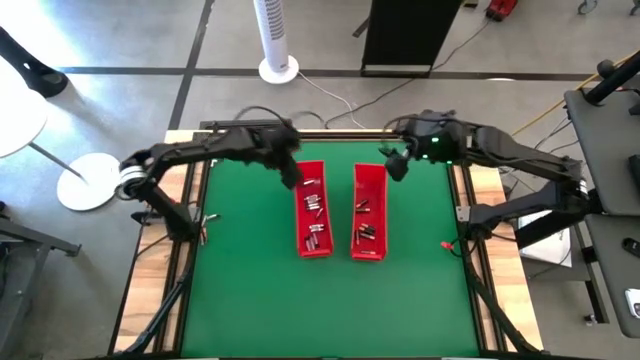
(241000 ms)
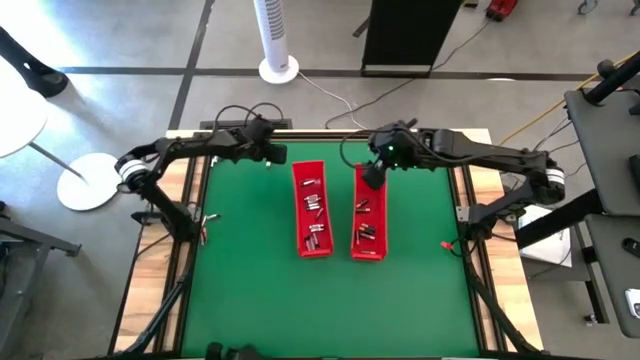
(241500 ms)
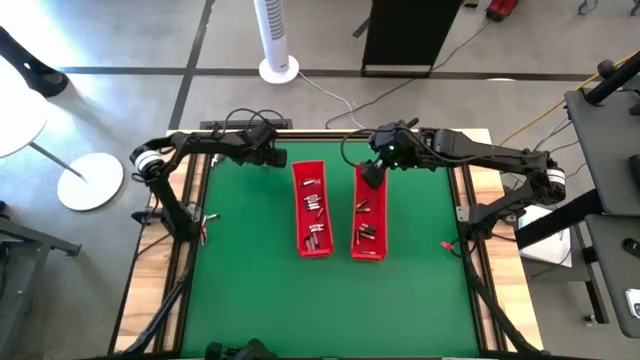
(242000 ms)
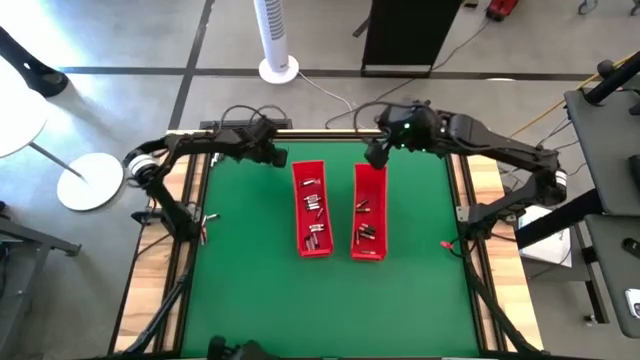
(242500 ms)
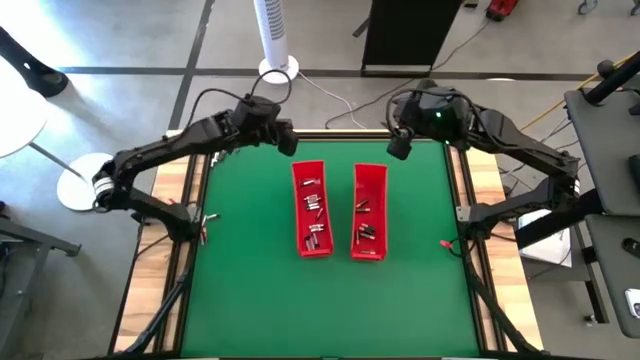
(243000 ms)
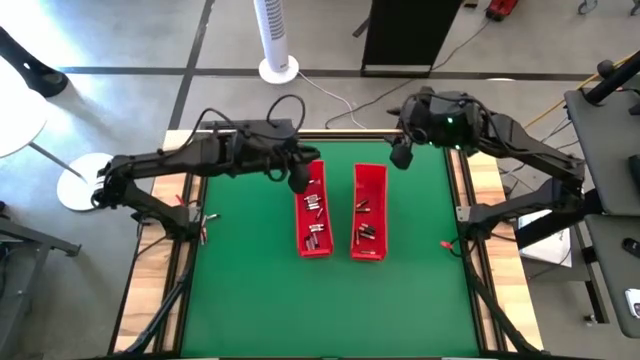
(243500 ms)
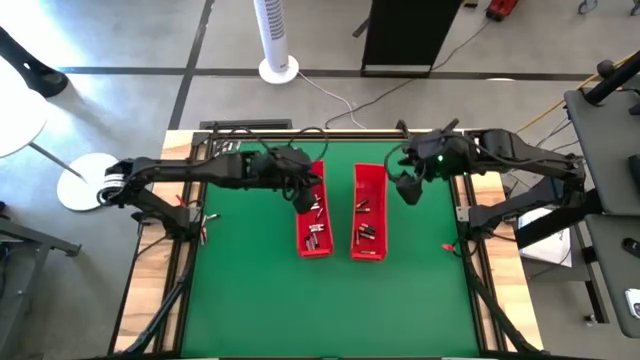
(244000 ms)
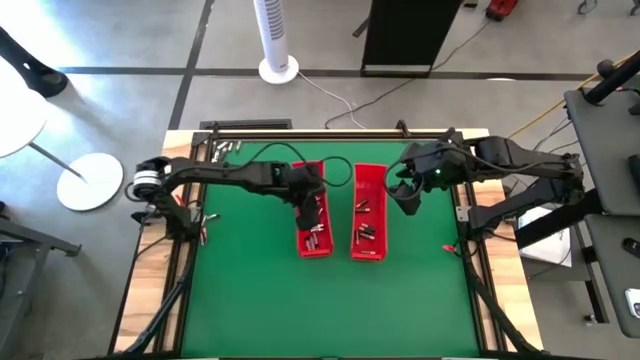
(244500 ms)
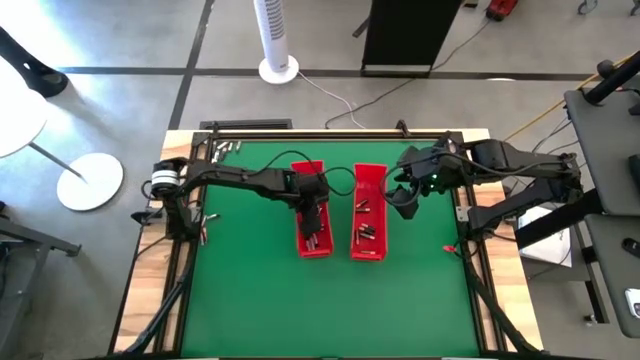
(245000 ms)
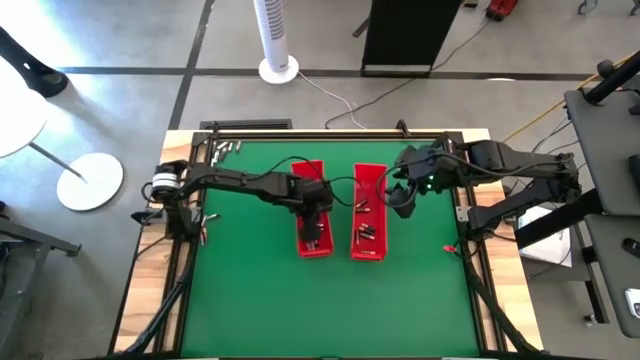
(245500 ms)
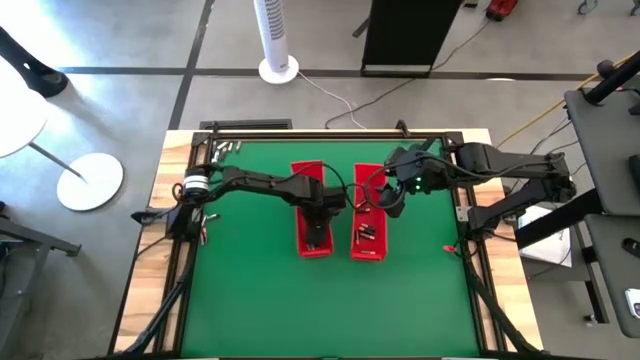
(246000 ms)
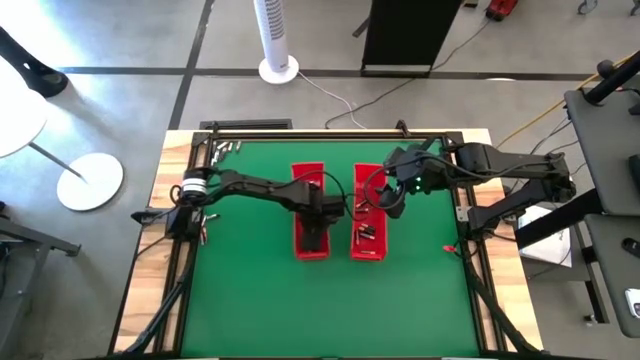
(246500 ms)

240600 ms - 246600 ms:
Task: Sort batteries
Put the silver battery into the left red bin

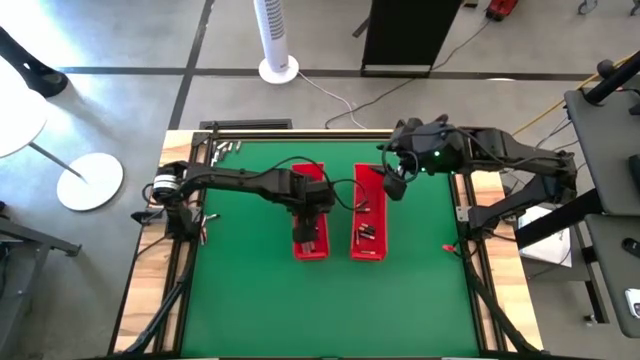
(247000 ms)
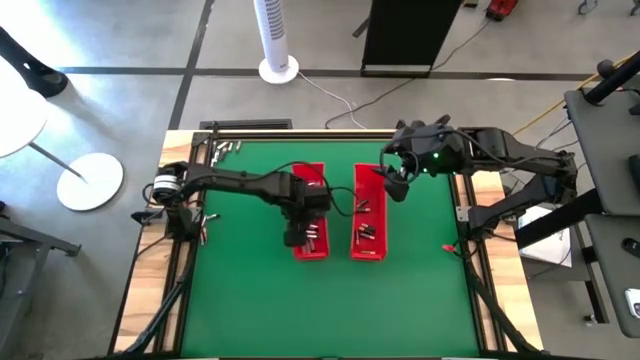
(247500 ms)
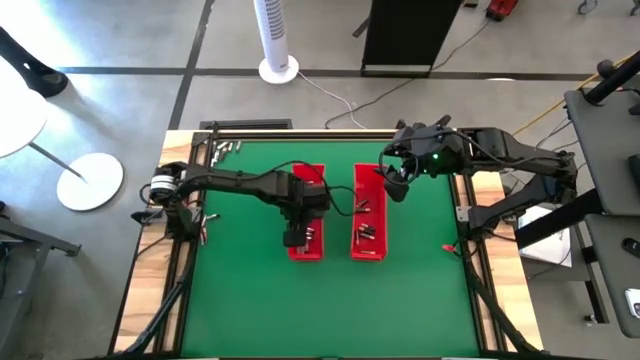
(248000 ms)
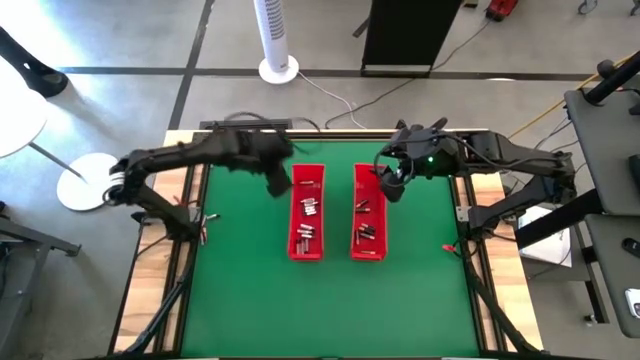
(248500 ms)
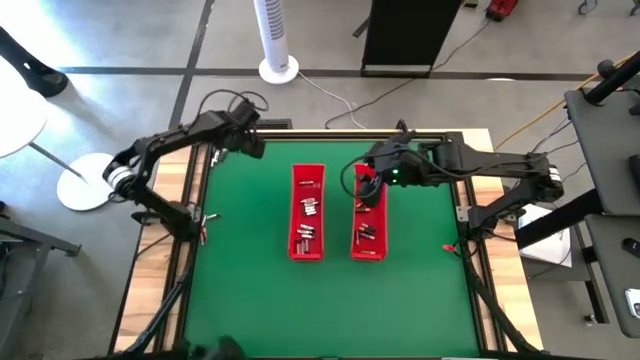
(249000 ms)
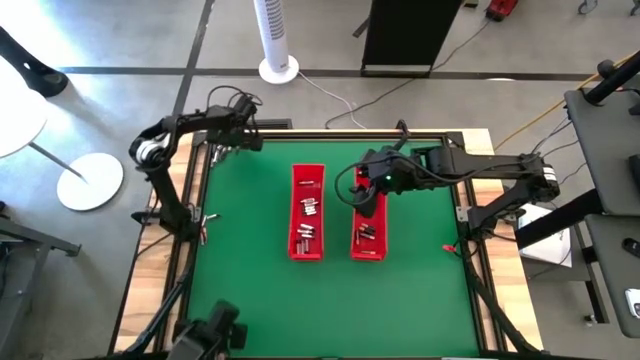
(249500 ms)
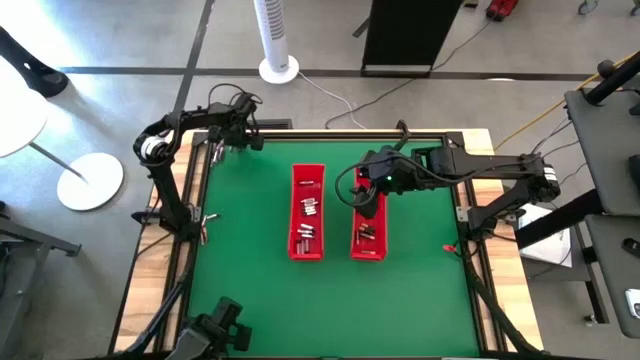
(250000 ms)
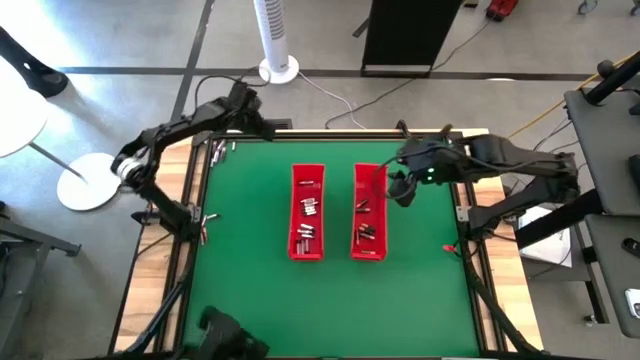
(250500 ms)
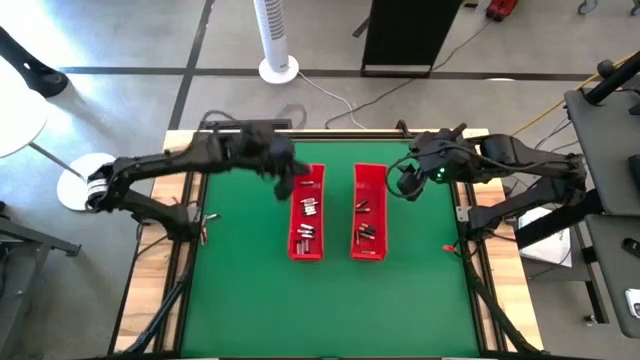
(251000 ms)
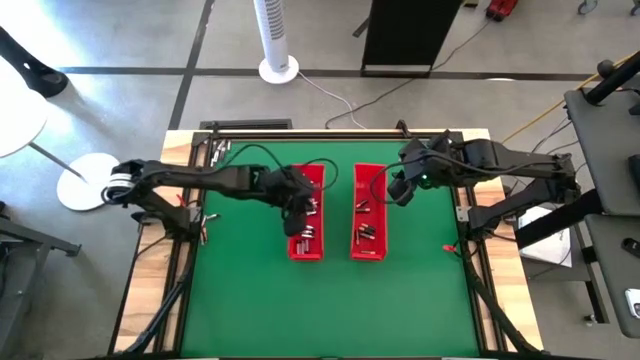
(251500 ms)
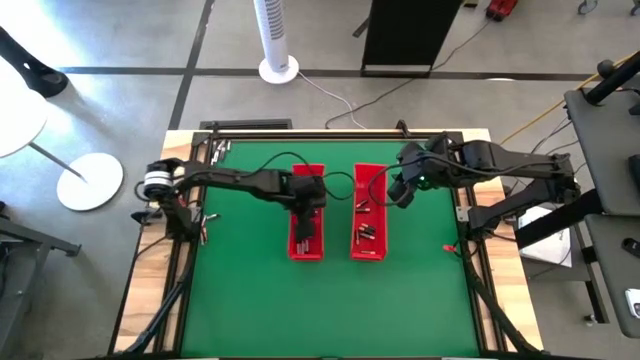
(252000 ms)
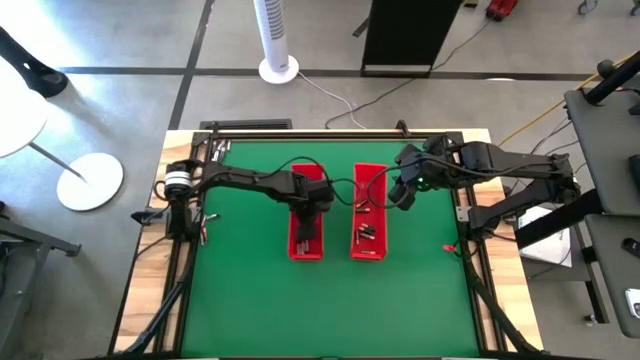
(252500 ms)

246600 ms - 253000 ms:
Put the silver battery into the left red bin

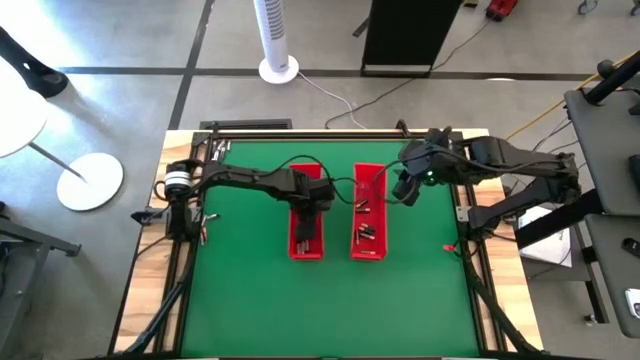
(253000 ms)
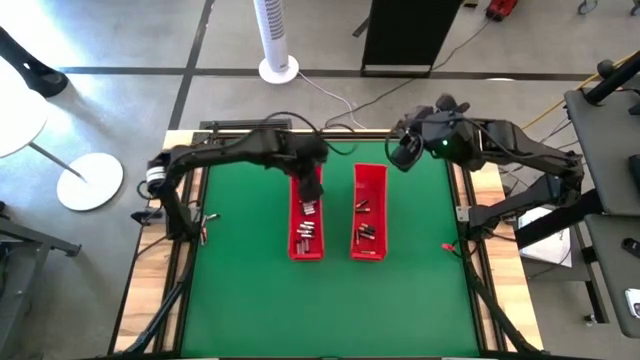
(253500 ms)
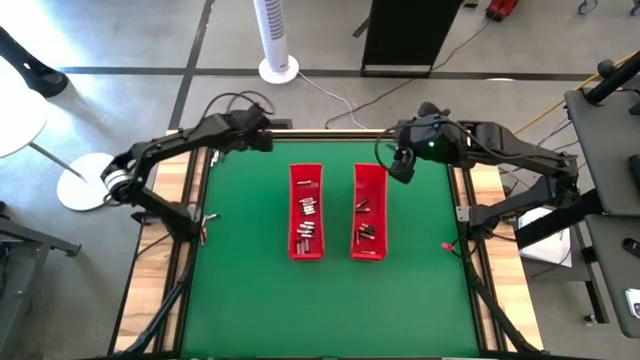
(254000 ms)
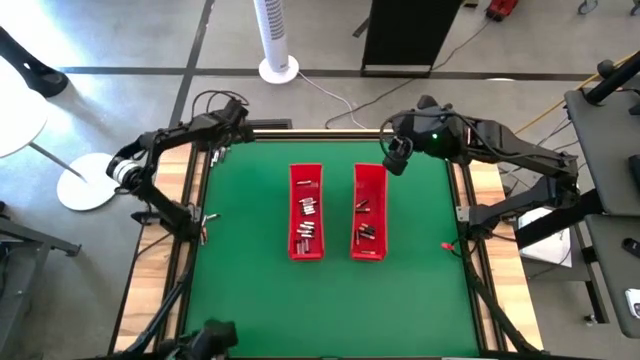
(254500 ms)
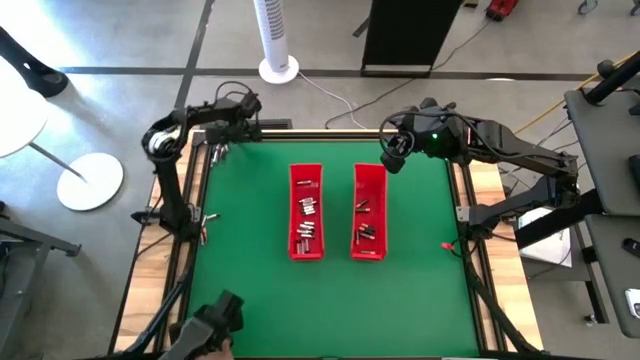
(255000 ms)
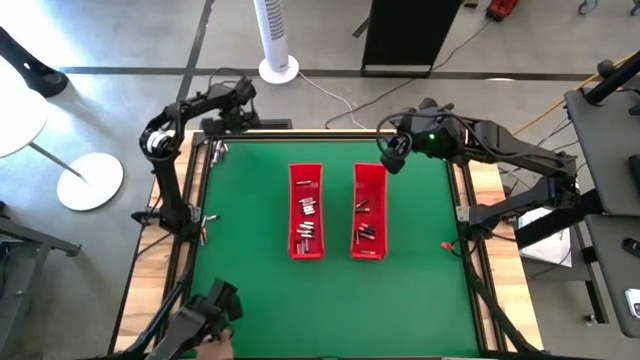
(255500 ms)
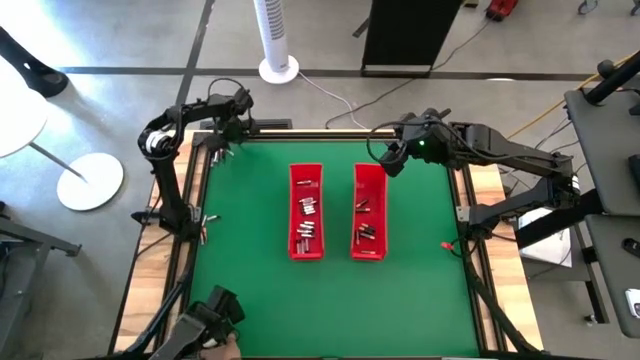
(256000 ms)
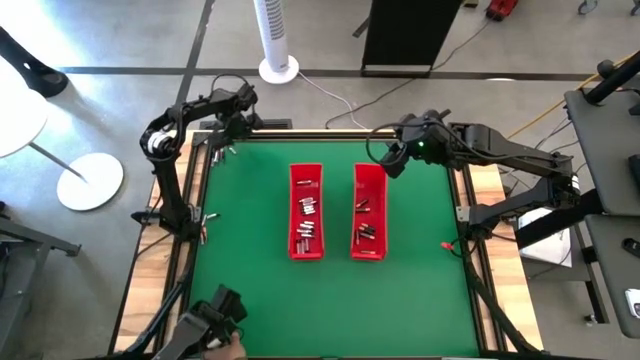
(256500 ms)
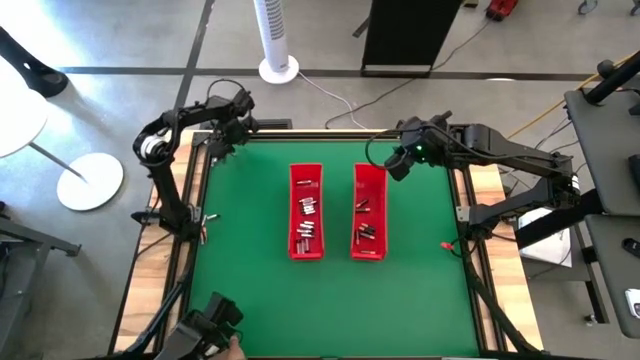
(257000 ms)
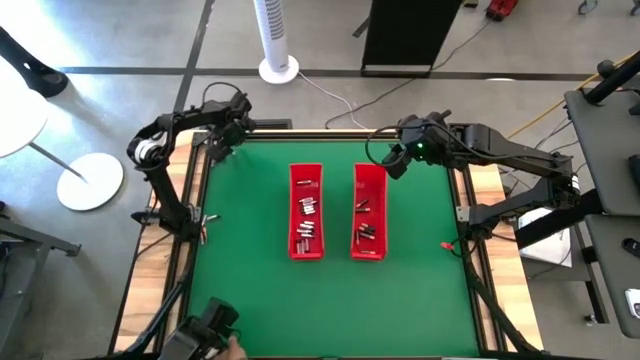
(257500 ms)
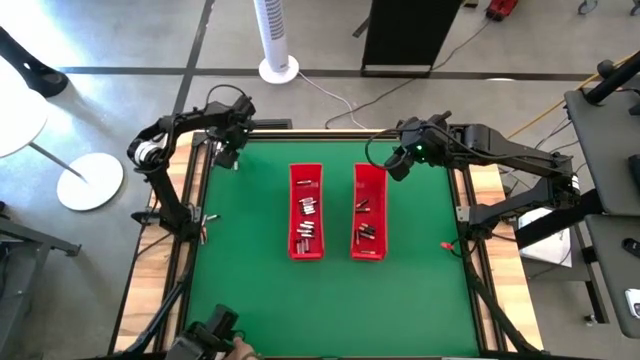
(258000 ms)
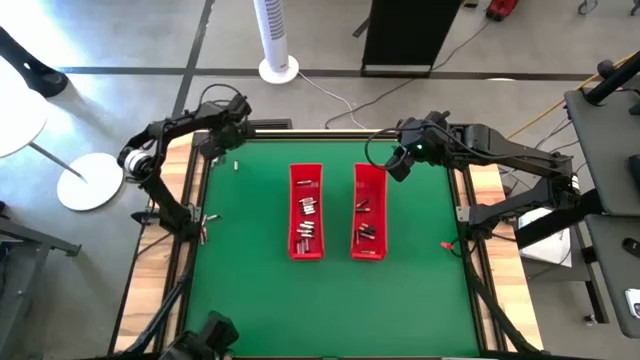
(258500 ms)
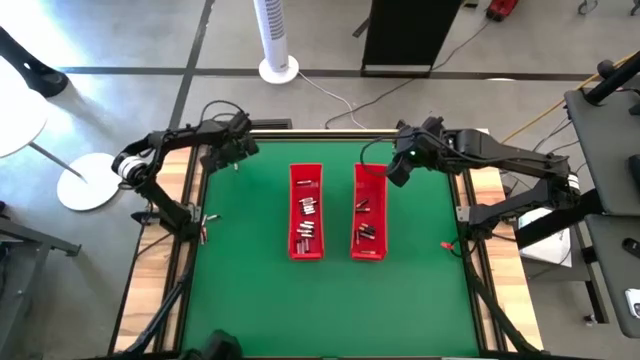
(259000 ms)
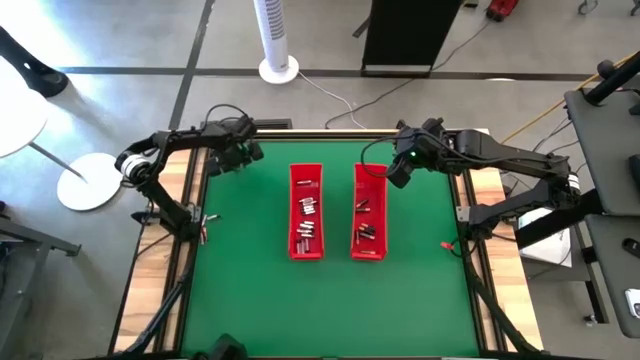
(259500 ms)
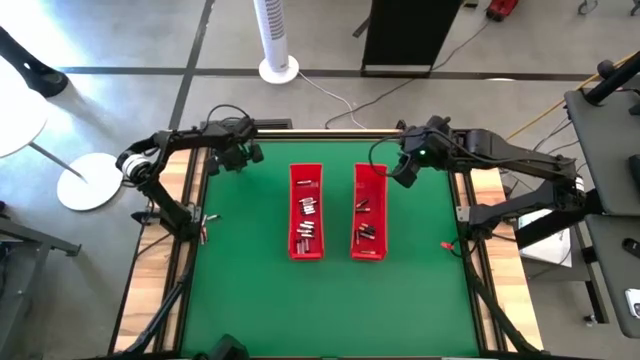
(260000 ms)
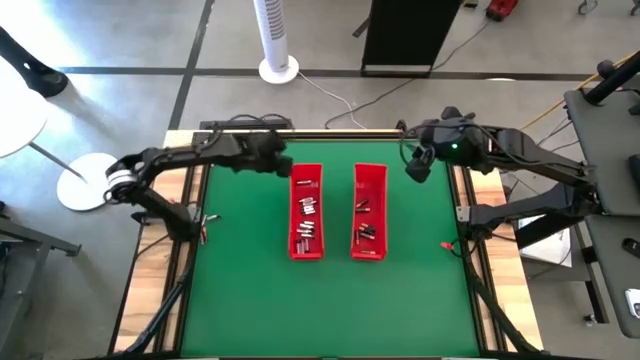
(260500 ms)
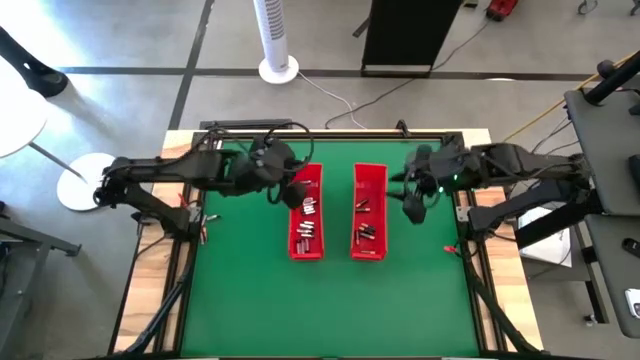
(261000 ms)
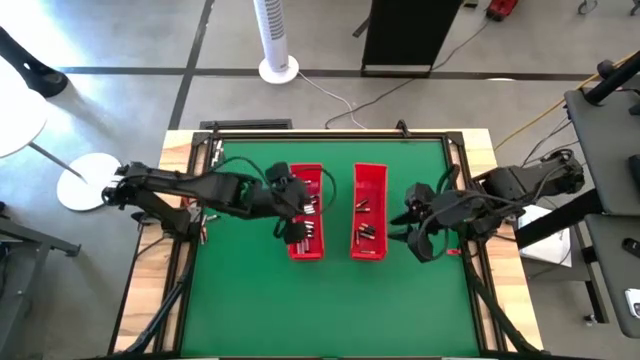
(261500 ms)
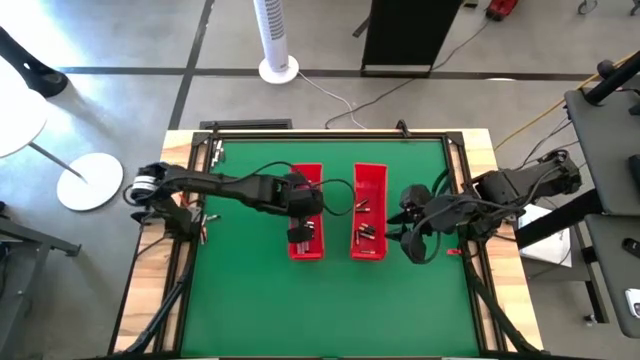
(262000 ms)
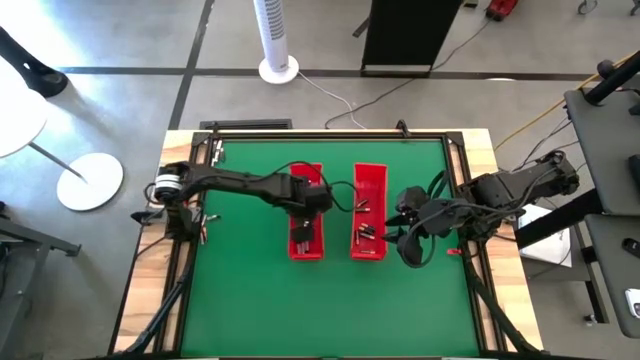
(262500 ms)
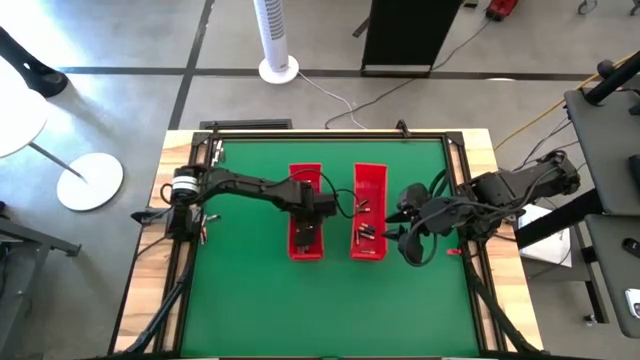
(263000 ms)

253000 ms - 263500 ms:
Put the silver battery into the left red bin
